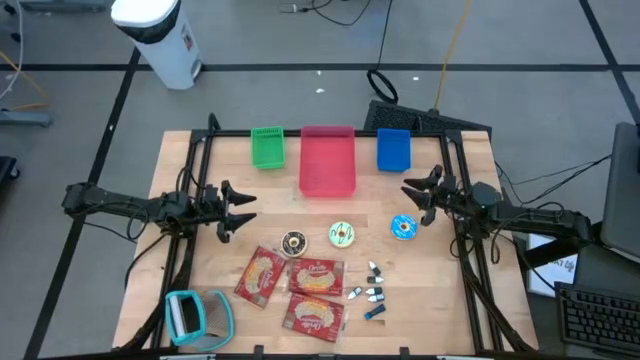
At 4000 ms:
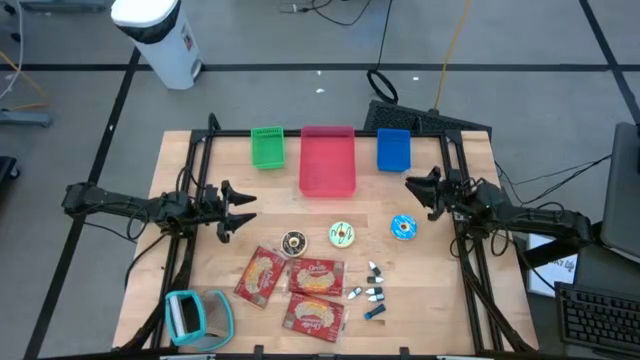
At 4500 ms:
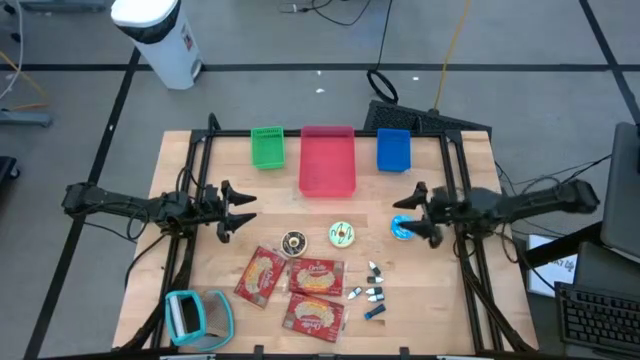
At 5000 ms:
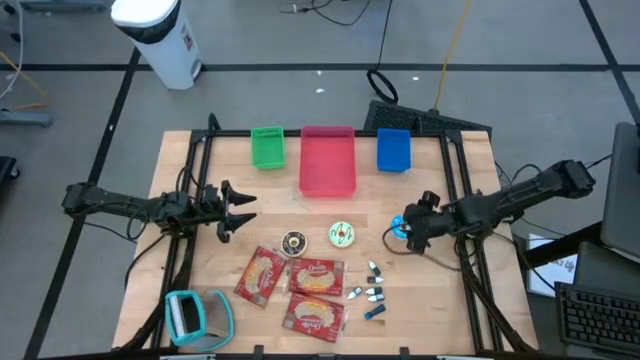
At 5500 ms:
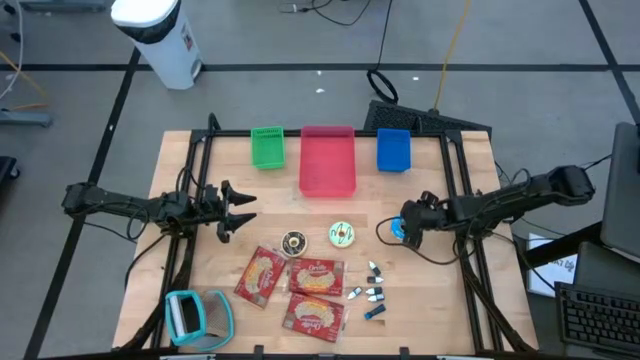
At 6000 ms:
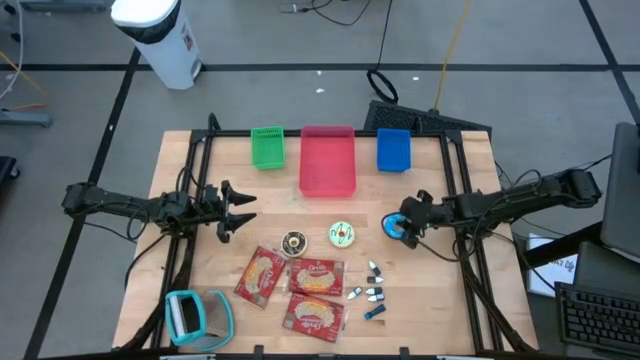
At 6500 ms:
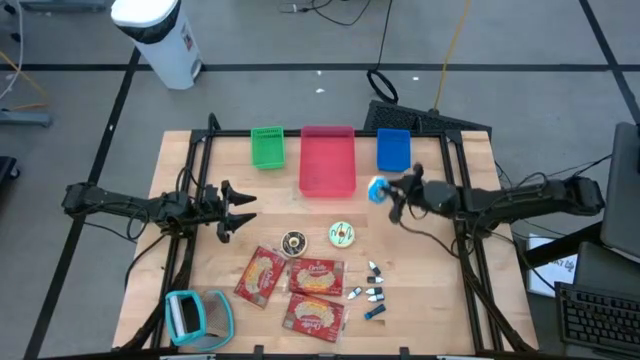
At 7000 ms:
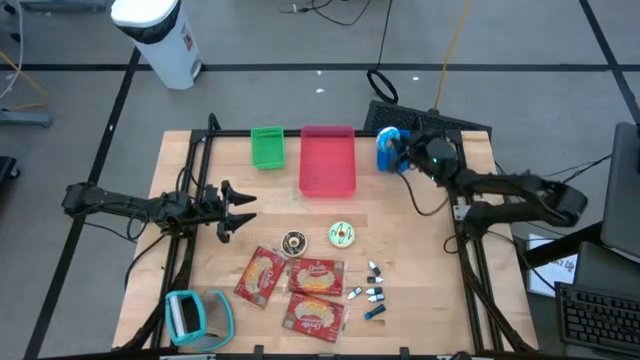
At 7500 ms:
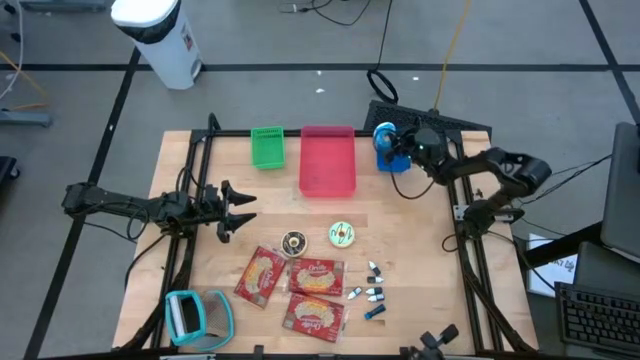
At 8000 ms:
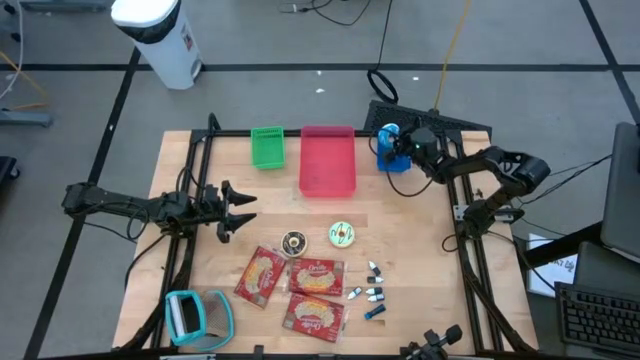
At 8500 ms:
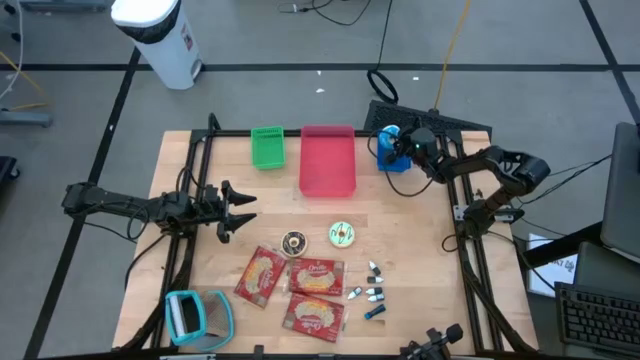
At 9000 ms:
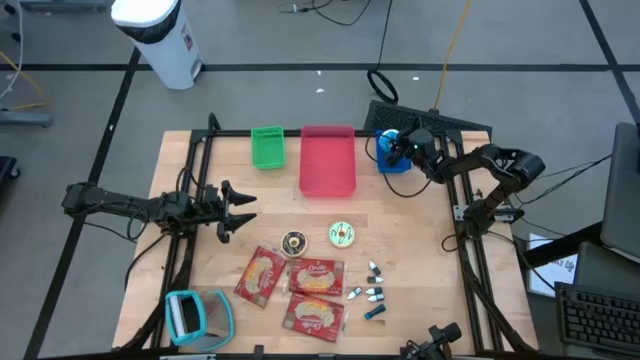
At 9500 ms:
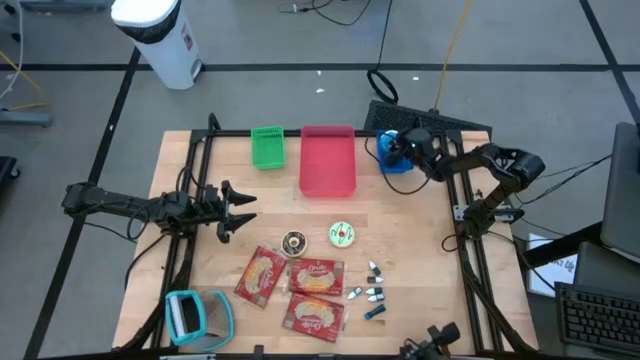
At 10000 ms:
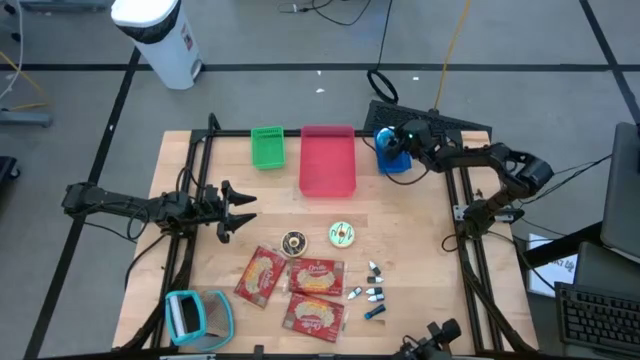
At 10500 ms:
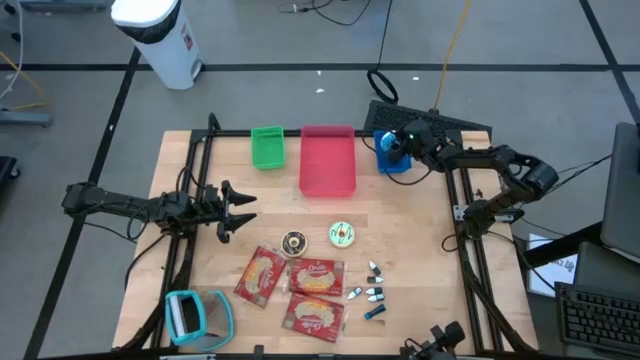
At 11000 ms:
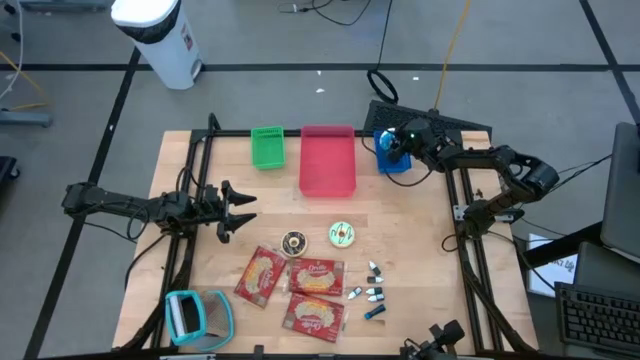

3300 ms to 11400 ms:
Put the blue doughnut into the blue bin

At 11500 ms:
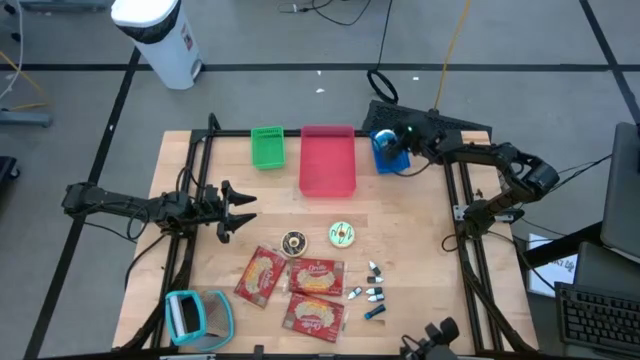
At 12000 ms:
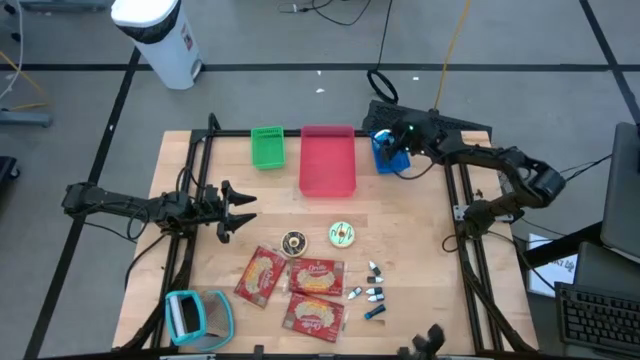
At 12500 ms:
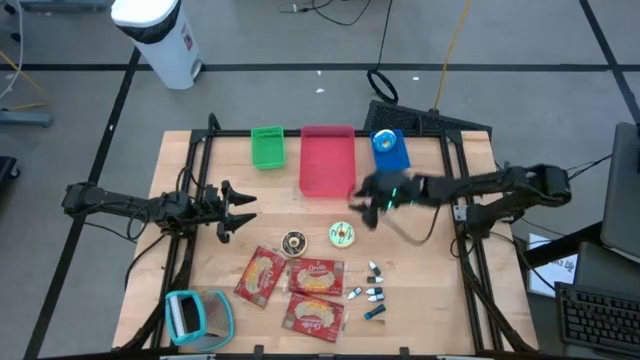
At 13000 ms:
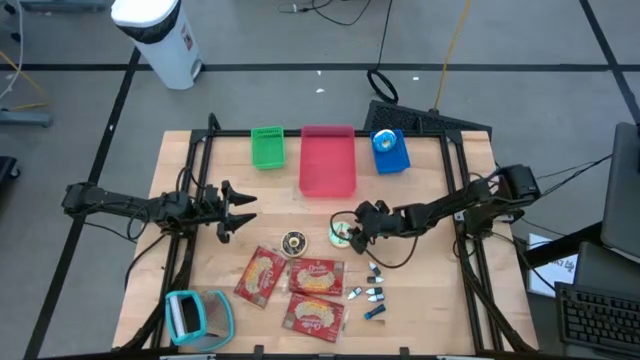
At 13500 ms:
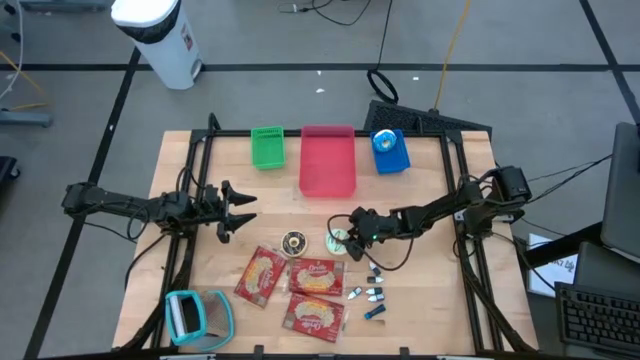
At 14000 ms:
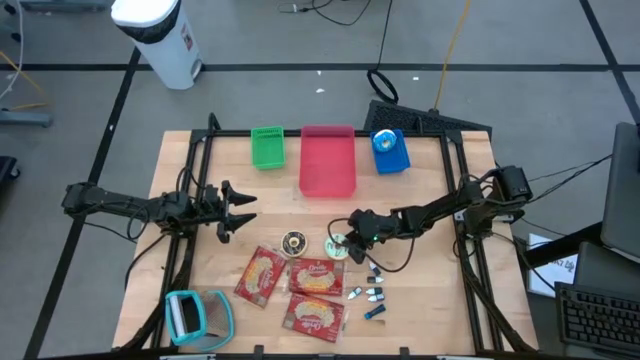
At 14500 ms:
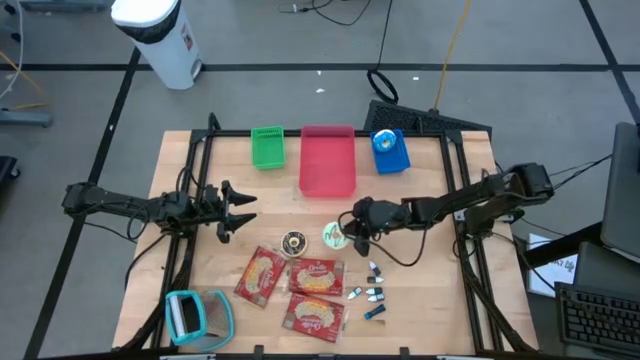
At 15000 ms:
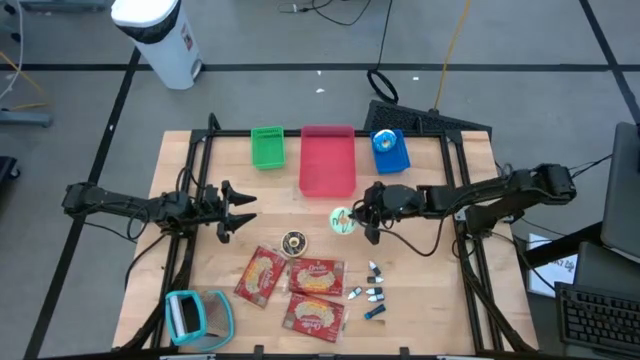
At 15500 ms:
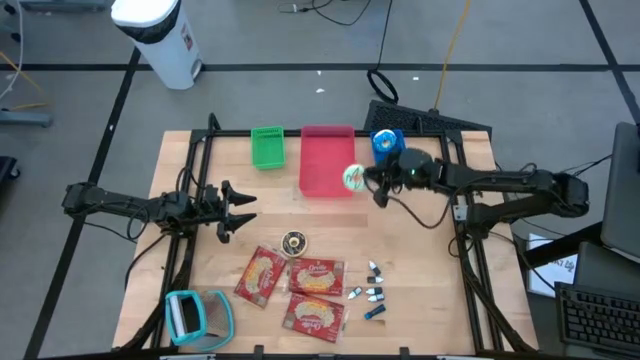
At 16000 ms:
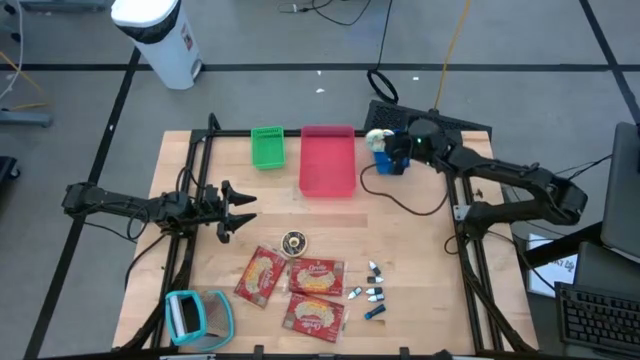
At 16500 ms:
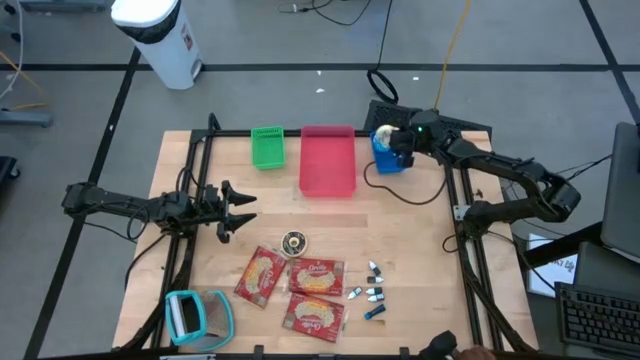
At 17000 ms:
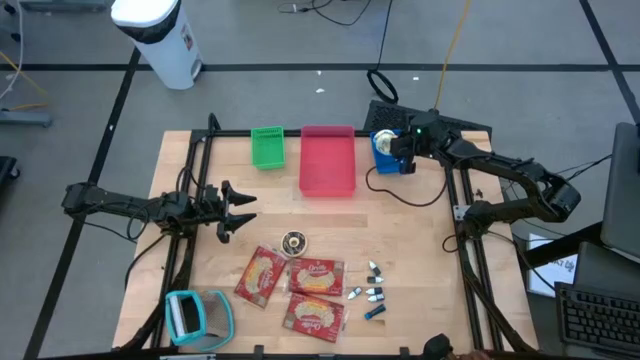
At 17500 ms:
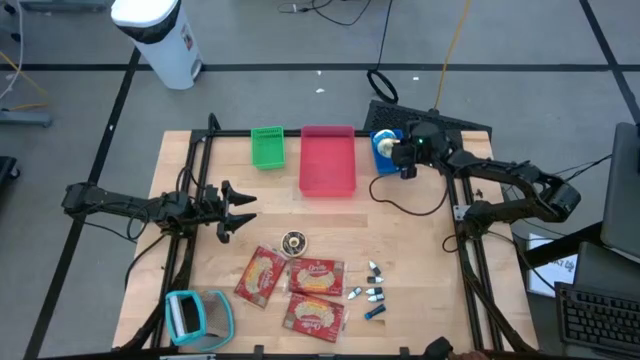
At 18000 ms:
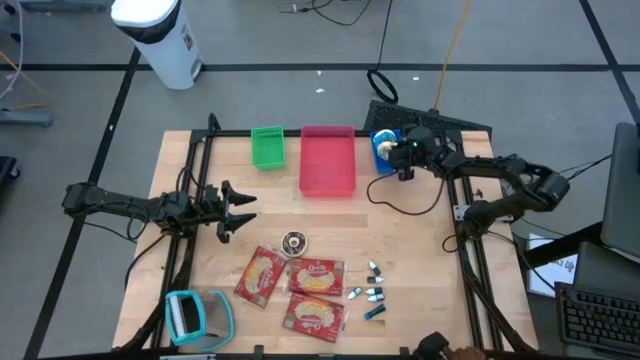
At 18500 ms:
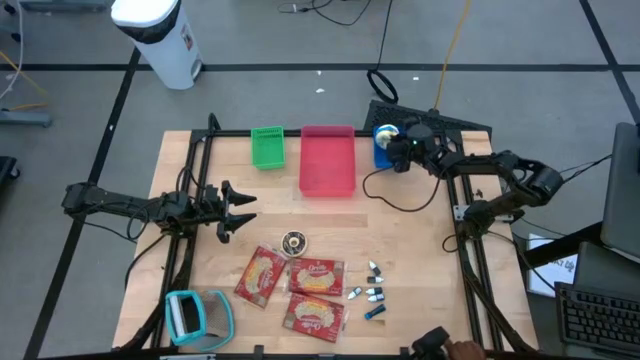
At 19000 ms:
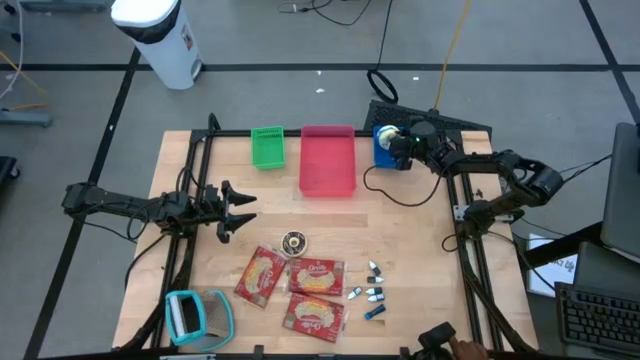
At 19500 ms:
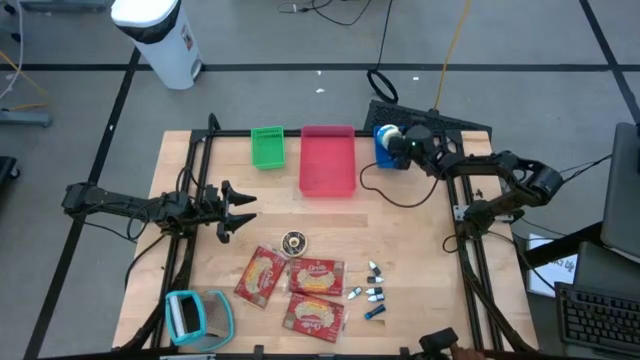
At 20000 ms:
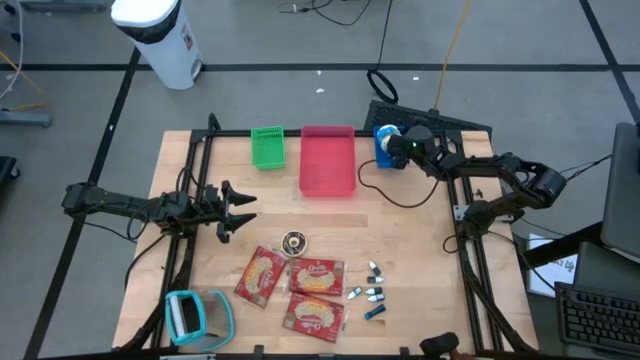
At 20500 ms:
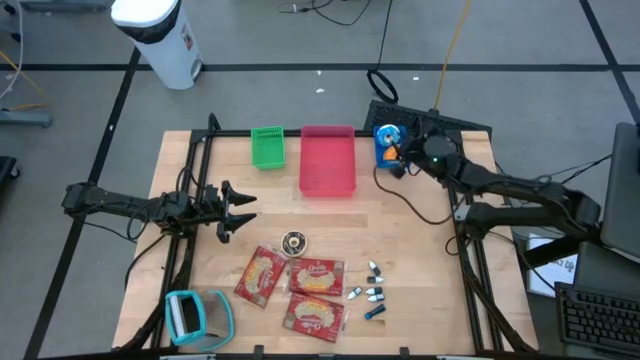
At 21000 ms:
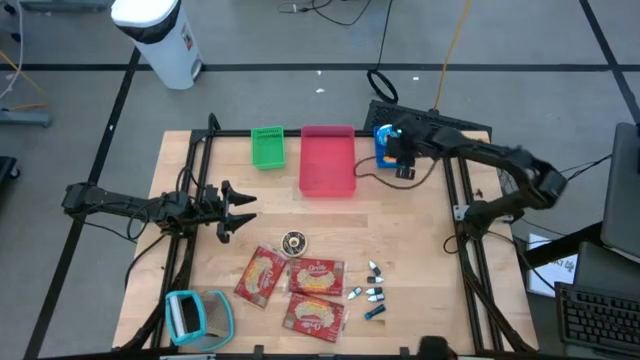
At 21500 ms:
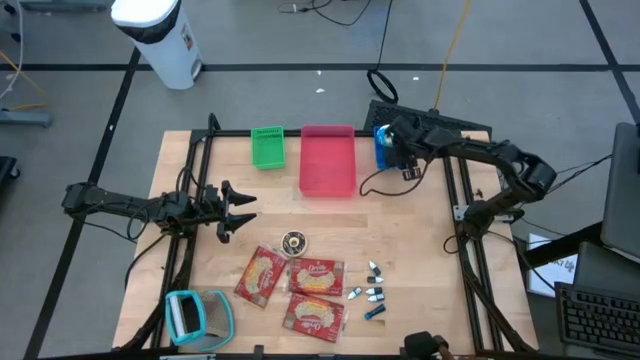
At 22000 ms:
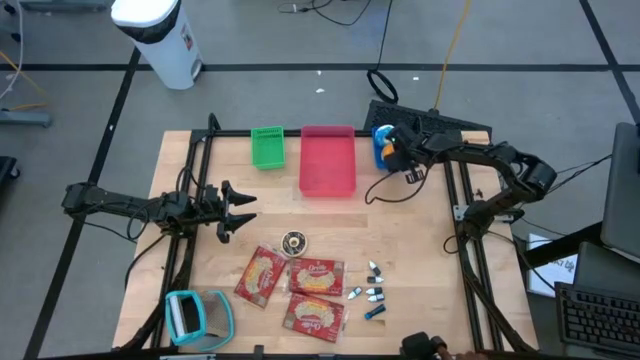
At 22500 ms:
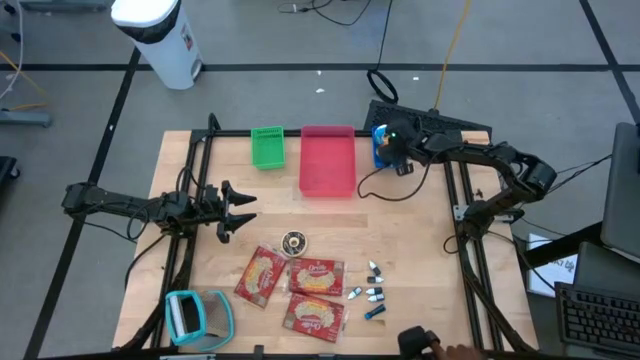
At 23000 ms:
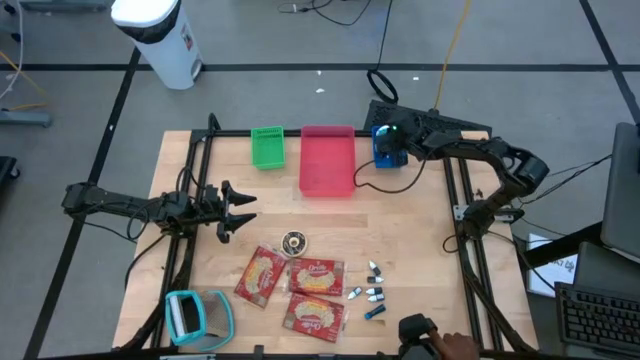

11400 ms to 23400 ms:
Put the light green doughnut into the blue bin
